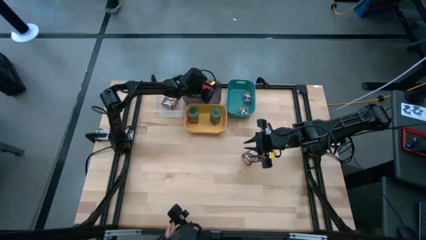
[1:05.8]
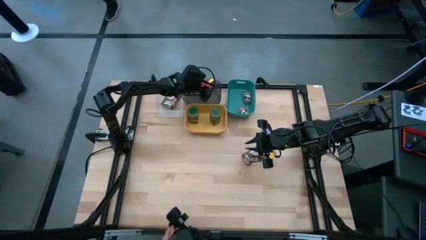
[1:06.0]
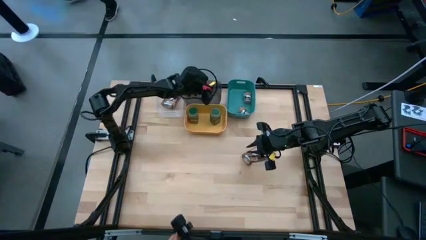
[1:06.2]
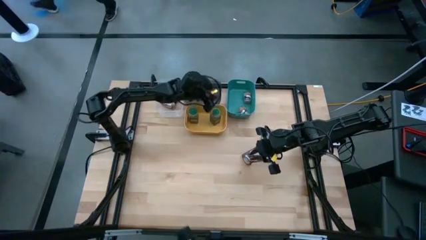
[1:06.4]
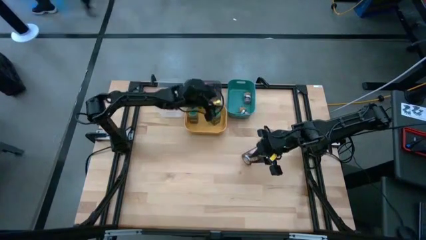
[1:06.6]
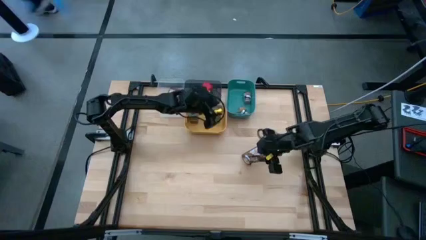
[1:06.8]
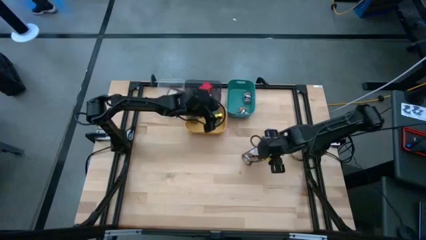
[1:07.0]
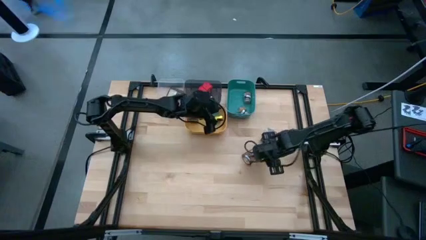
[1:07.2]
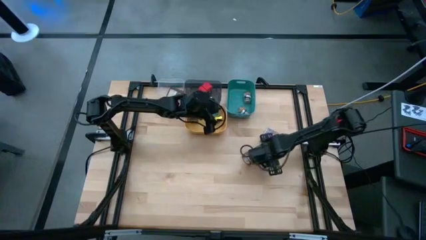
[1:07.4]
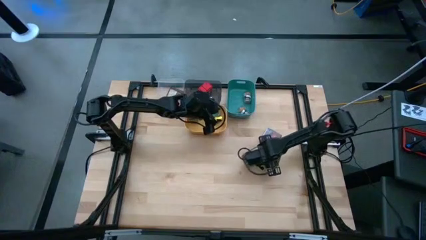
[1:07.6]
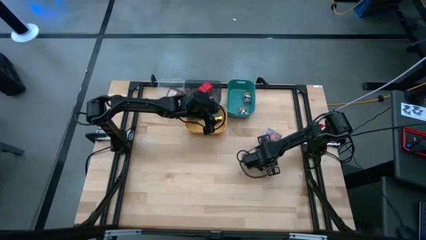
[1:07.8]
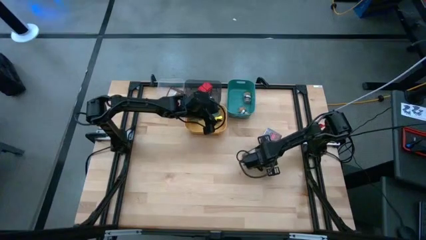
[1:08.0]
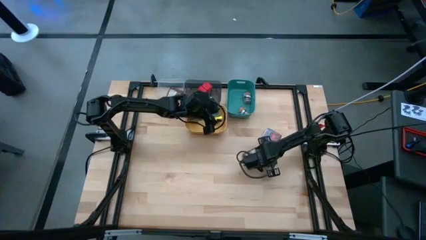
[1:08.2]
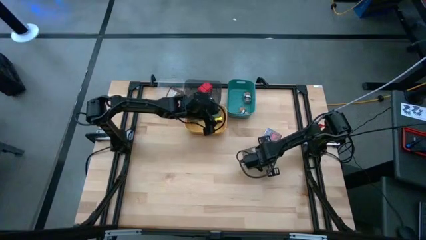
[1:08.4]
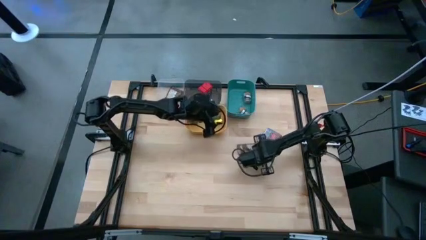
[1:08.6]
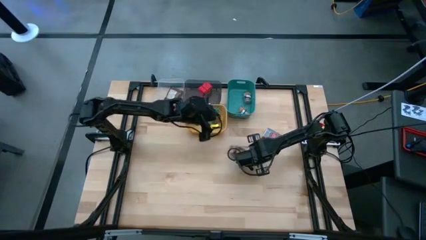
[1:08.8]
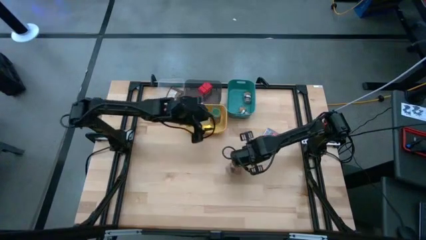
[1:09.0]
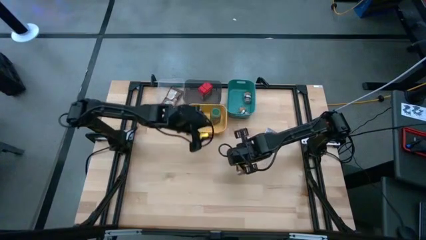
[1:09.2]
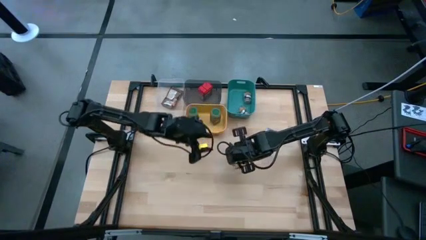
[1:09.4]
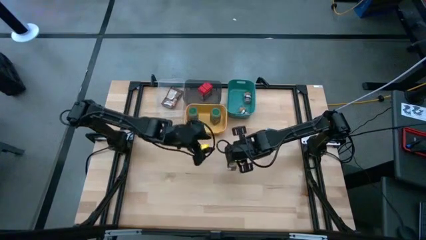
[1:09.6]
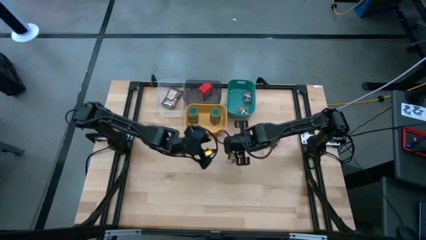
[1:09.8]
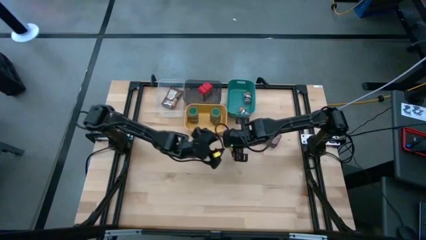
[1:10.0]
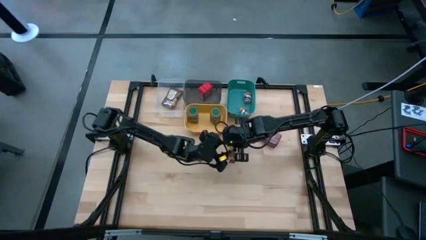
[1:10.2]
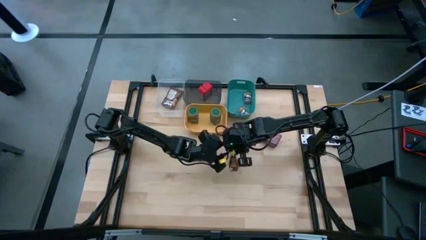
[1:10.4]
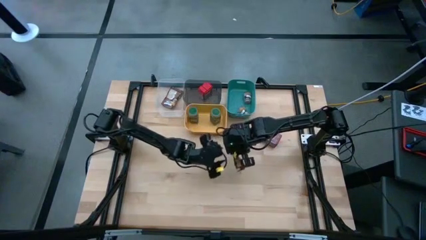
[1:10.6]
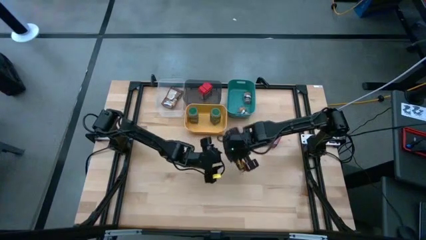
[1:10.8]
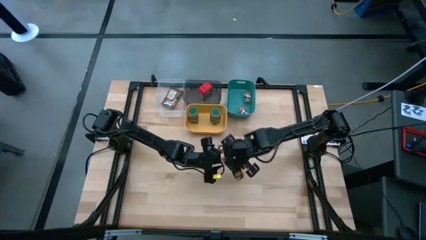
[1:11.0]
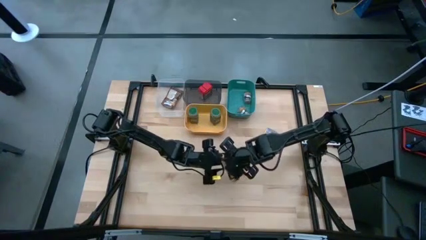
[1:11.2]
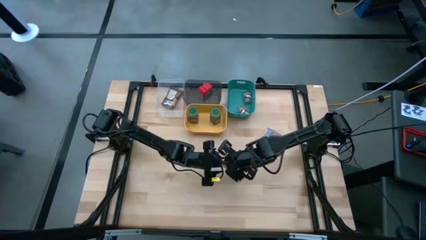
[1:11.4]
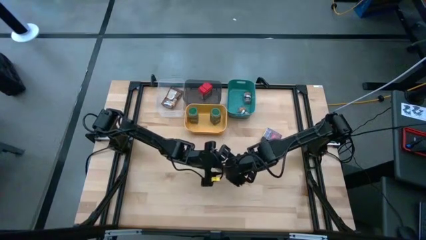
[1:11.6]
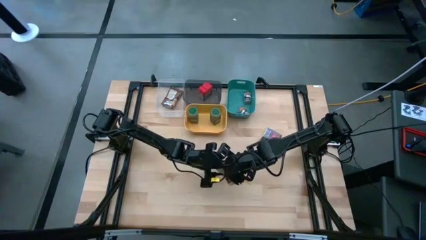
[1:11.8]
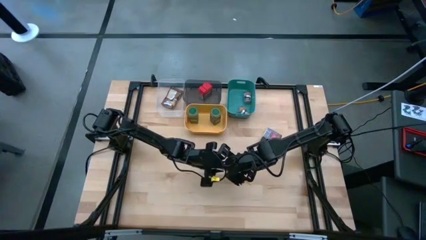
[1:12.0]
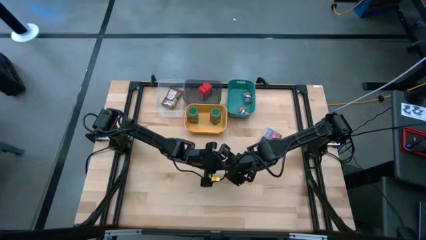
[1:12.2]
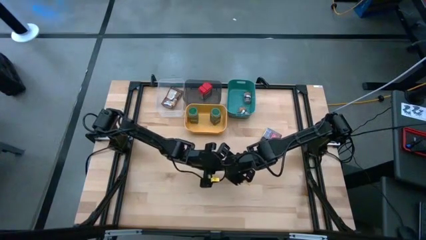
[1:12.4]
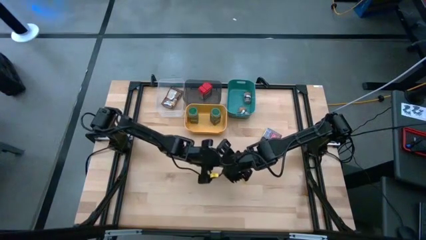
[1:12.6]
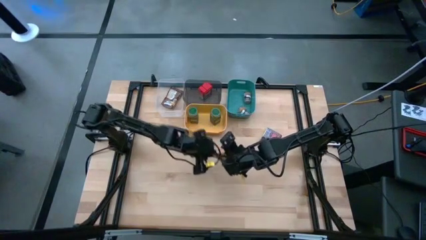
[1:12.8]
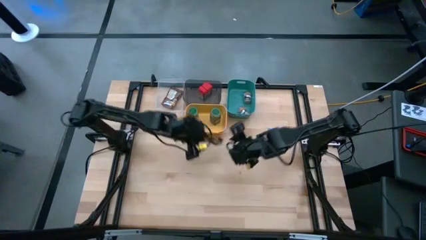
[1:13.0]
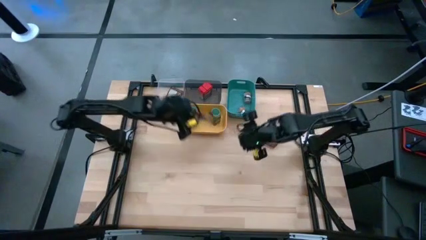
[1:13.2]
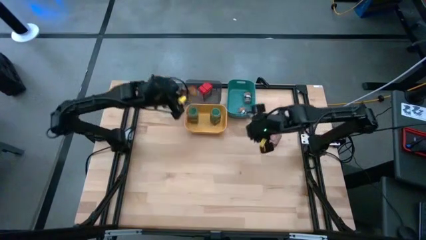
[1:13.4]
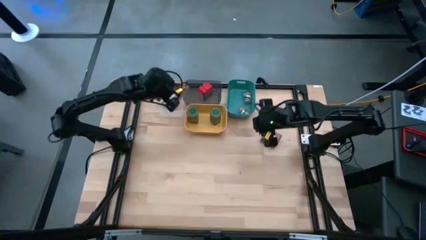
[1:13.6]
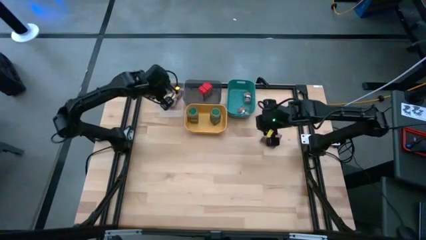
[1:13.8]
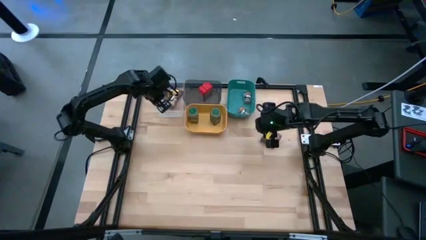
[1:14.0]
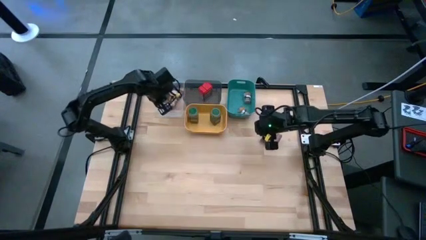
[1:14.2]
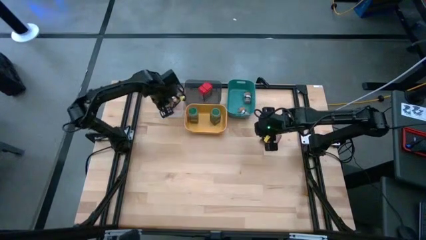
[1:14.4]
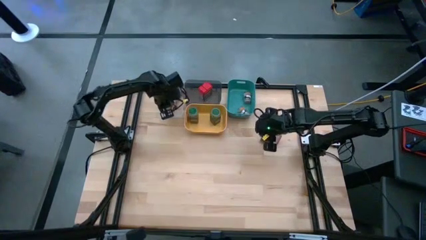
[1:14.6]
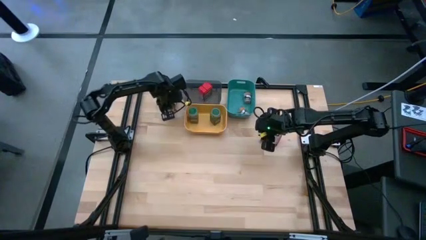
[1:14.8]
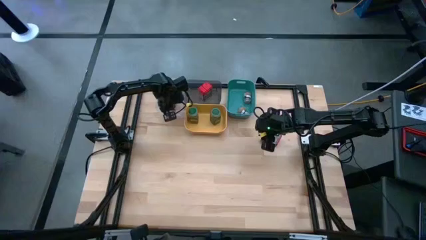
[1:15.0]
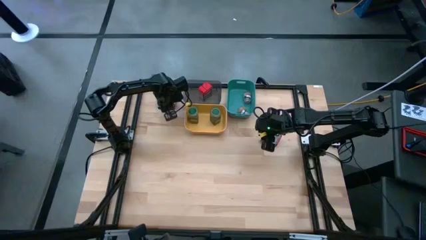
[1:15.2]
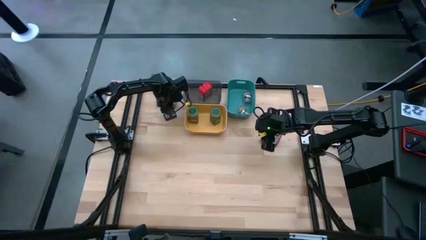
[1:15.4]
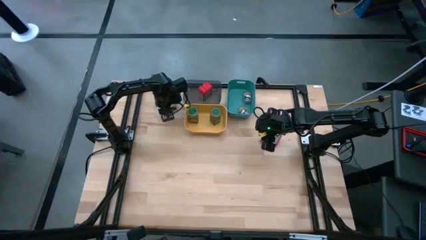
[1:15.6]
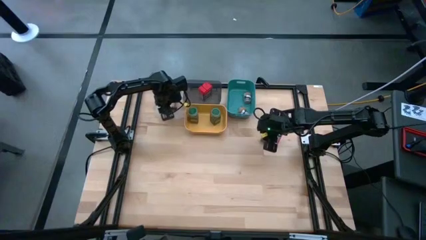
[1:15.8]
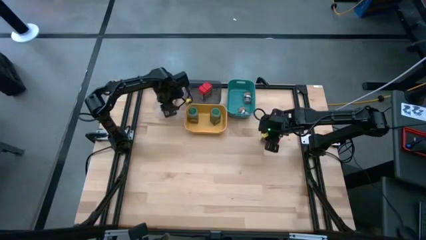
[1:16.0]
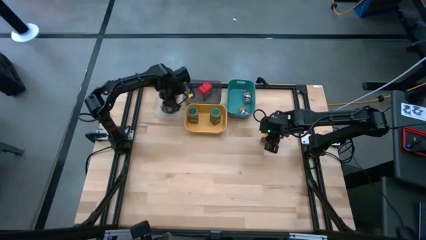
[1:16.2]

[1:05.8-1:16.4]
Task: Sort spices by type
Put the orange seasoning bag into the transparent bin

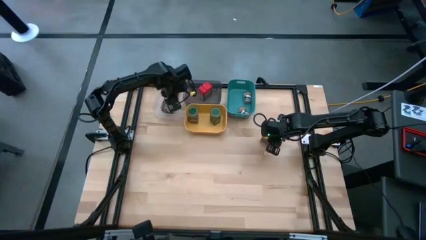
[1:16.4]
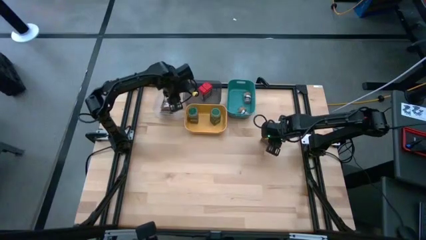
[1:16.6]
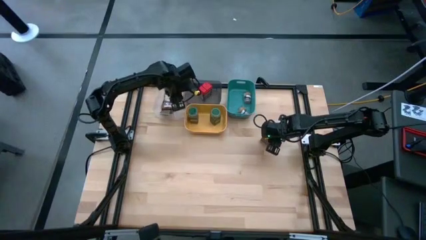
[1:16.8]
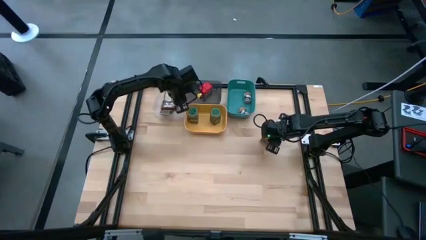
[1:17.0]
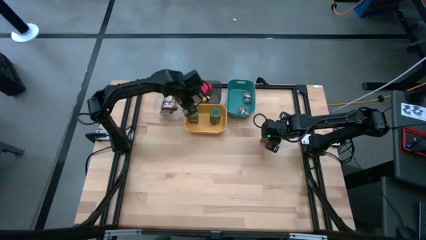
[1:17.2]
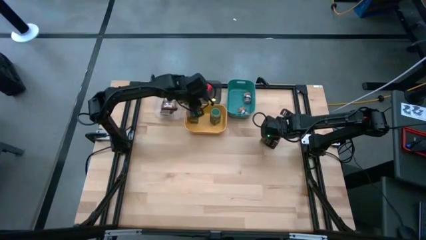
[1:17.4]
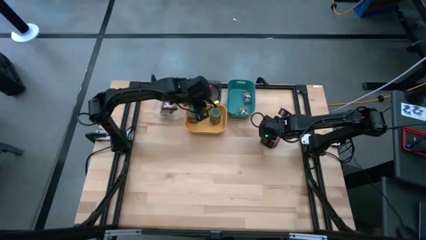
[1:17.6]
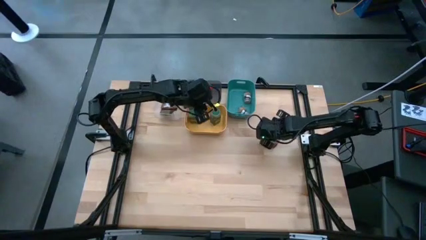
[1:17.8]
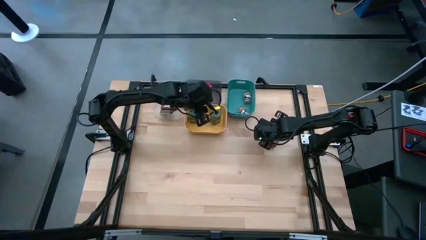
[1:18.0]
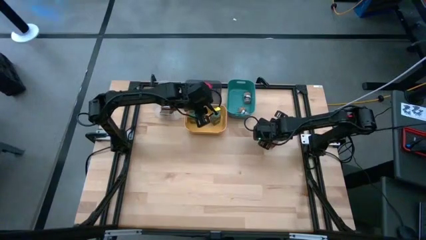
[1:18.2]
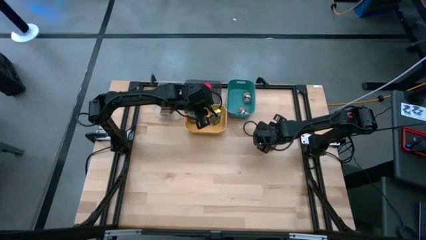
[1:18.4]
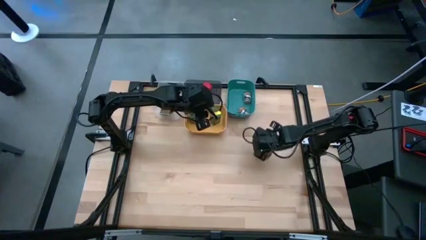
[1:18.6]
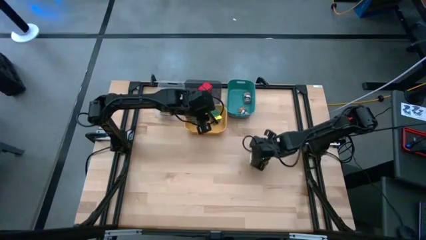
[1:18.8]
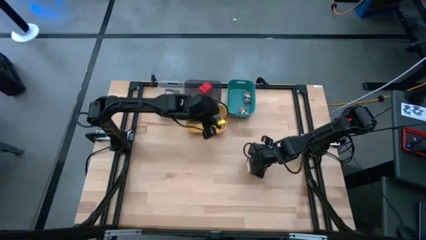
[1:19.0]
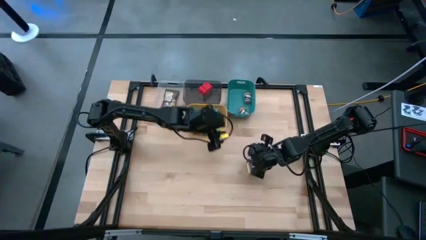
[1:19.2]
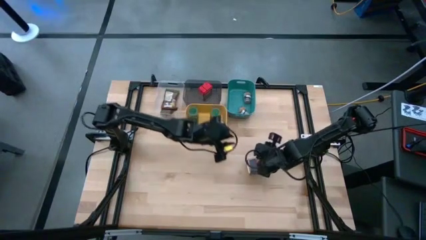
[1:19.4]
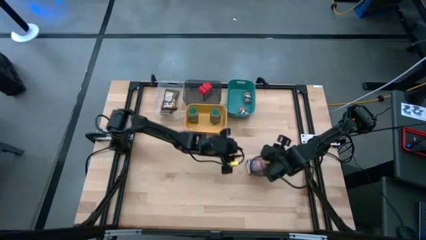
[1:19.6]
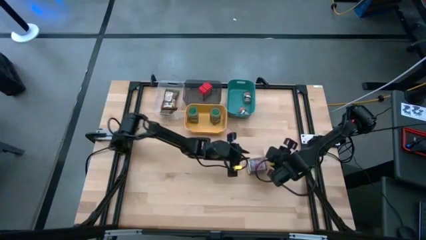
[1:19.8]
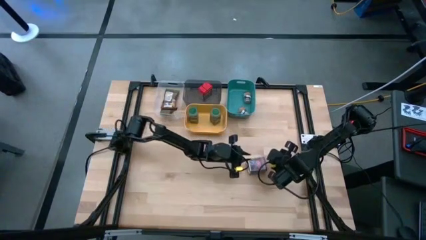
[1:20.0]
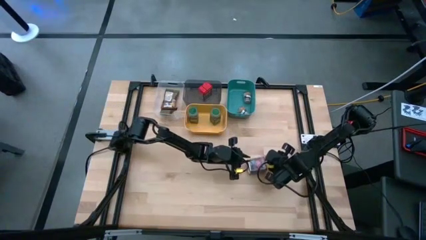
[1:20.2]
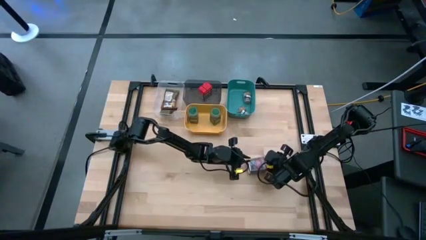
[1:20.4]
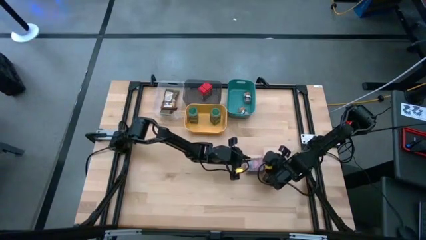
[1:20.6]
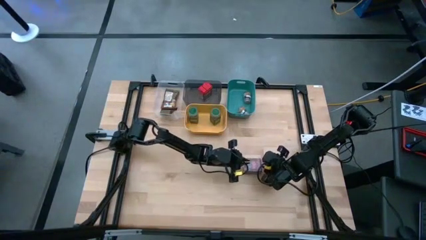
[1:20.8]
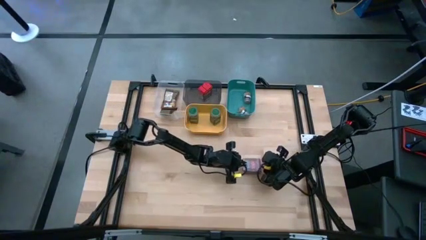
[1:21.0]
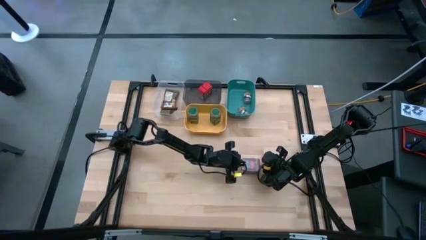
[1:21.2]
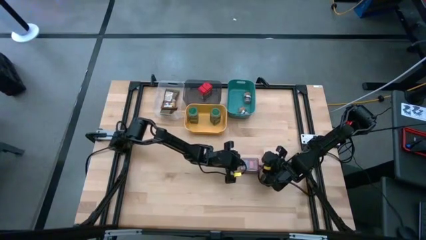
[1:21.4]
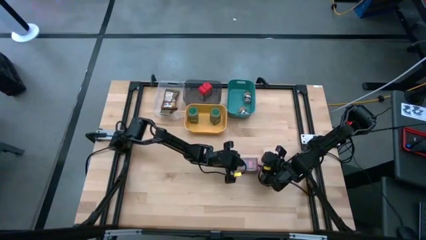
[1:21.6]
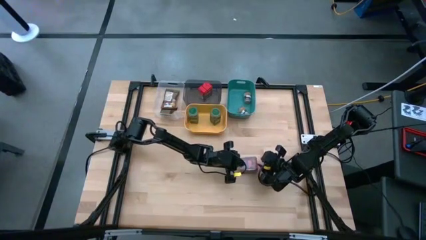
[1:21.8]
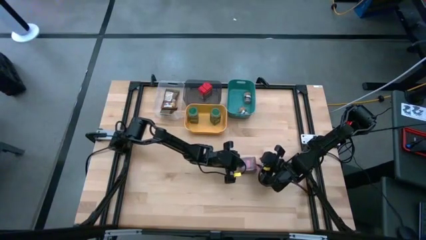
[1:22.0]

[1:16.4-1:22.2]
Put the red can into the black transparent bin
